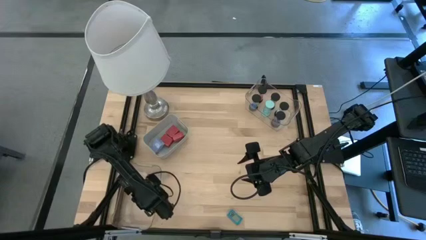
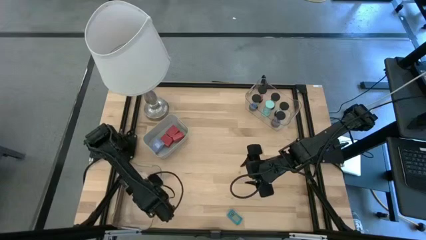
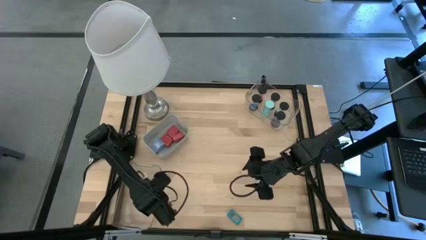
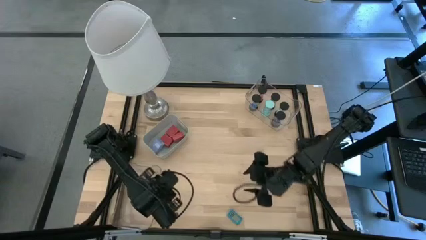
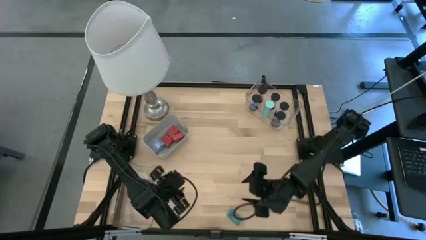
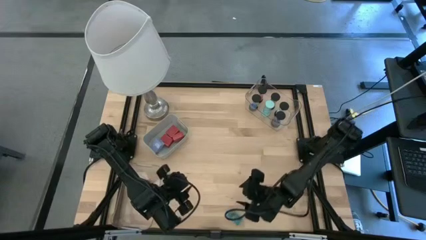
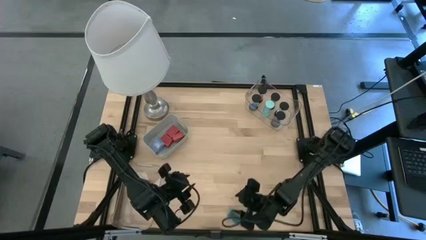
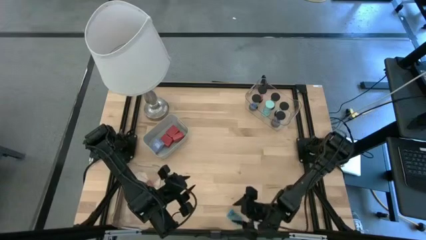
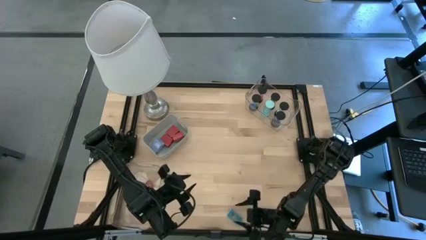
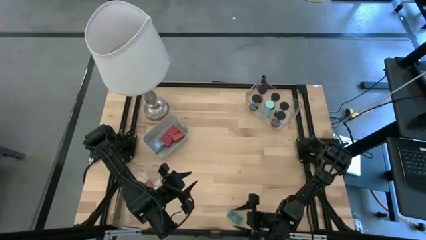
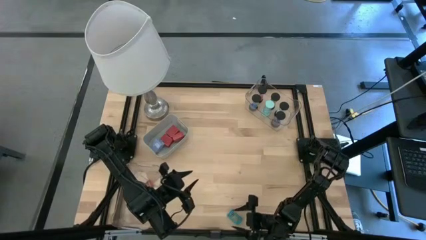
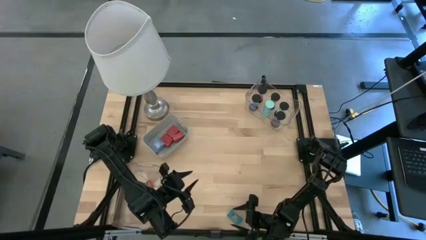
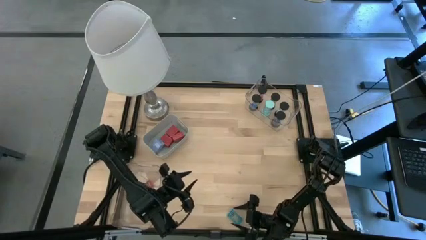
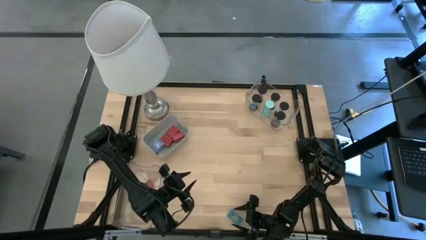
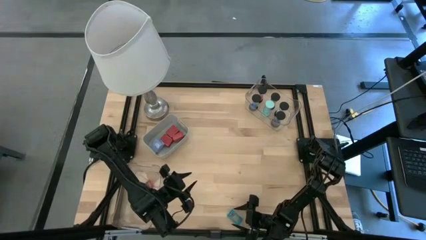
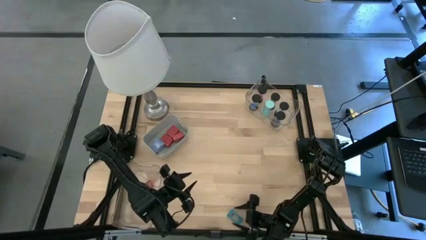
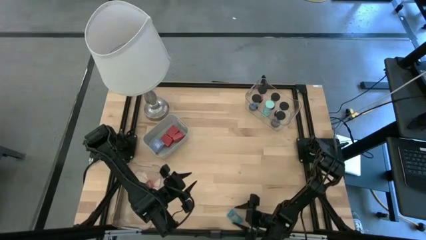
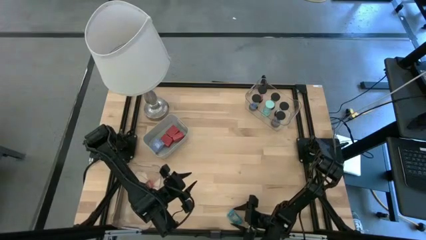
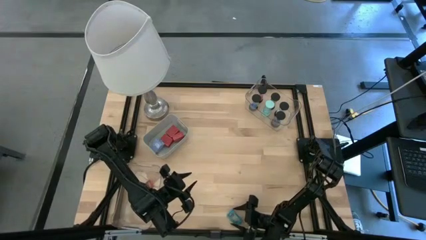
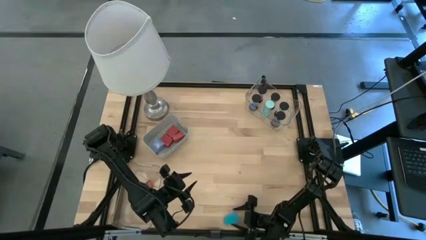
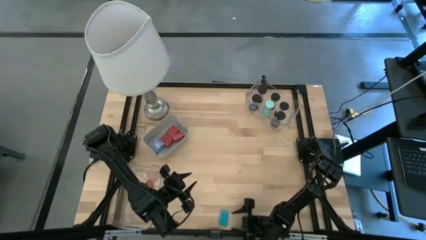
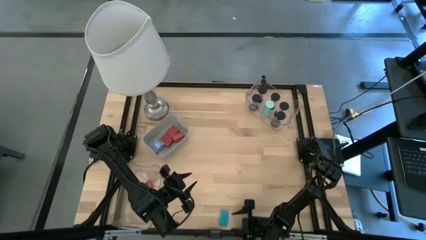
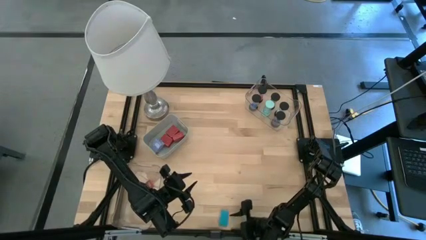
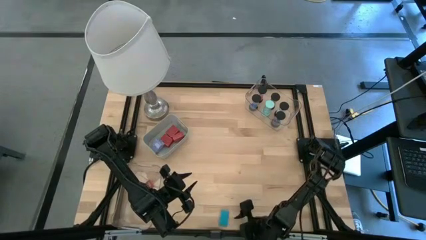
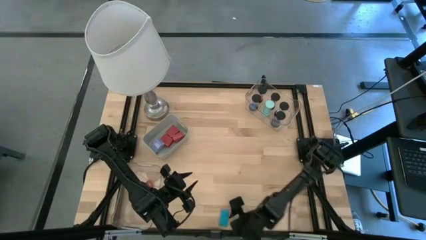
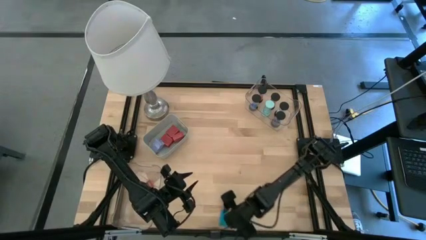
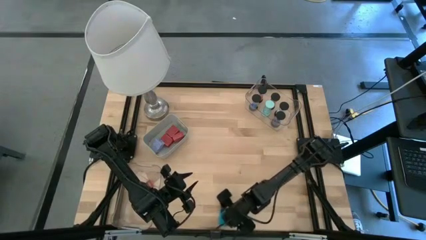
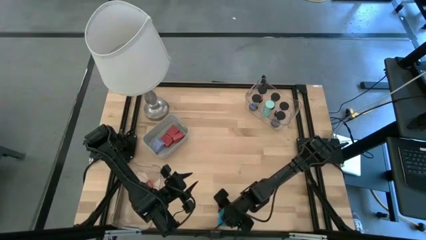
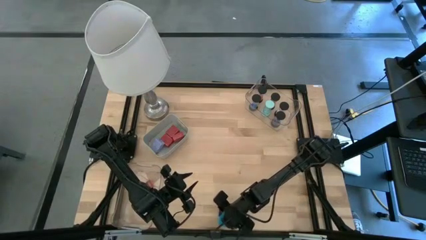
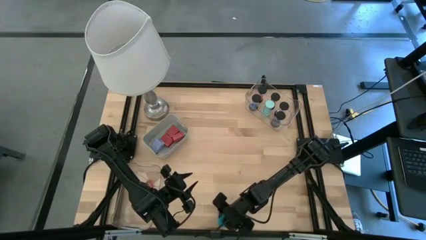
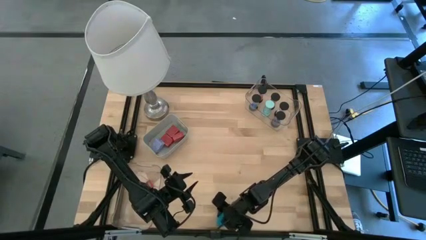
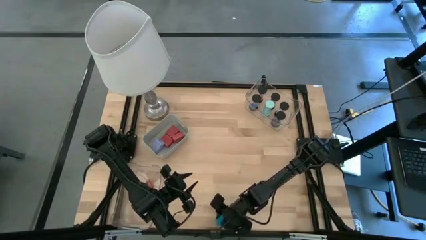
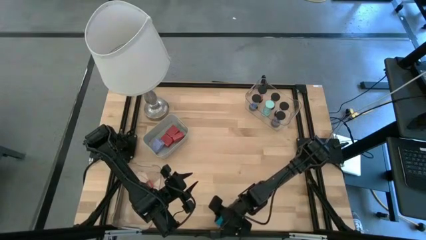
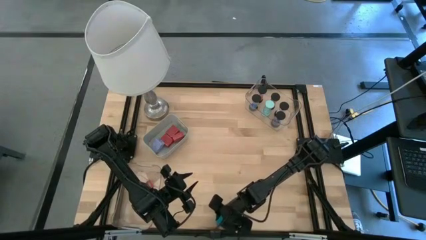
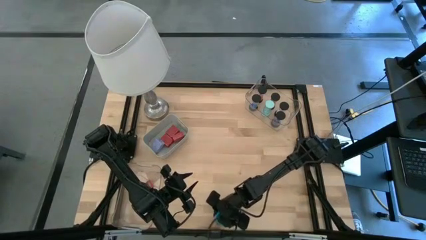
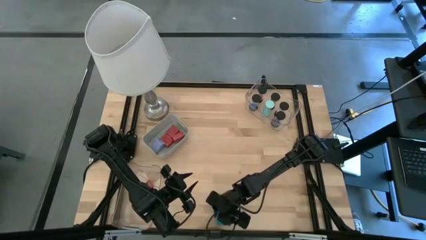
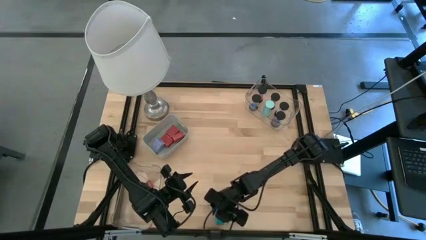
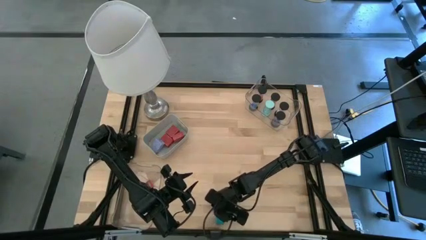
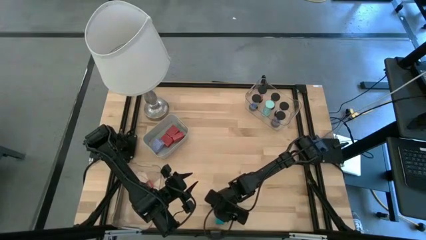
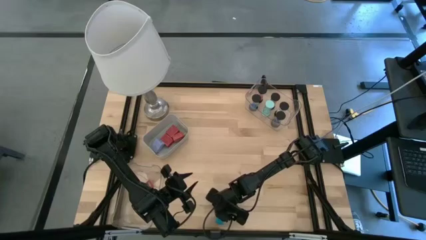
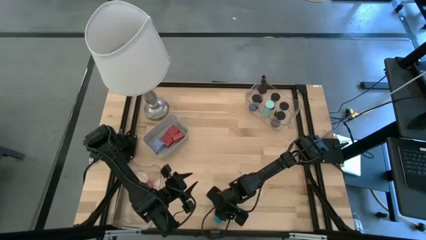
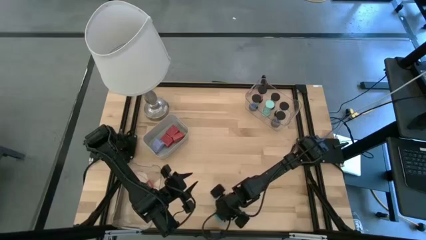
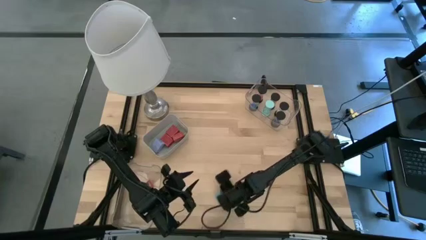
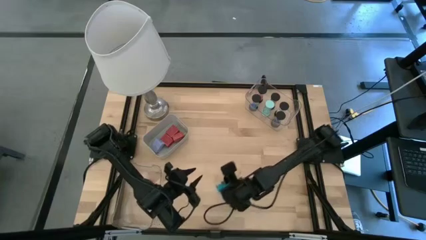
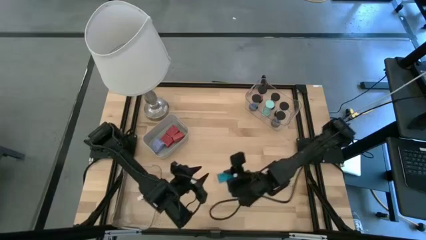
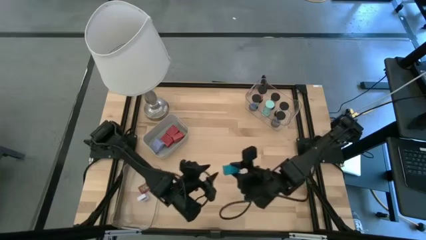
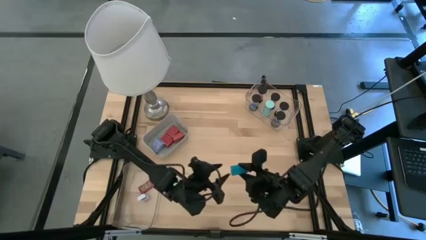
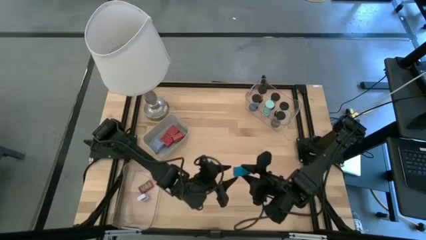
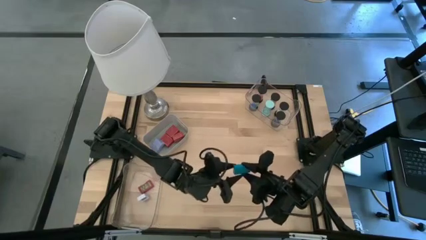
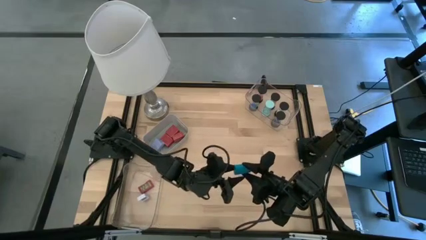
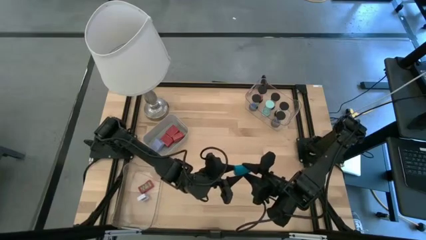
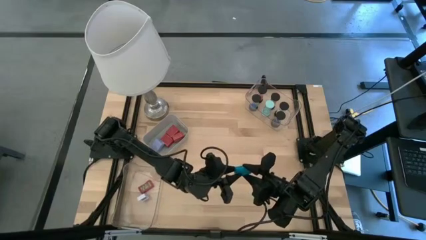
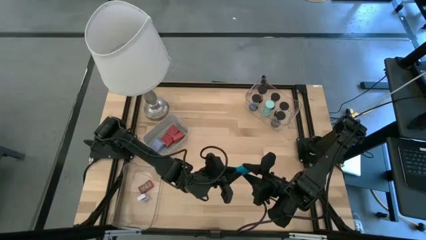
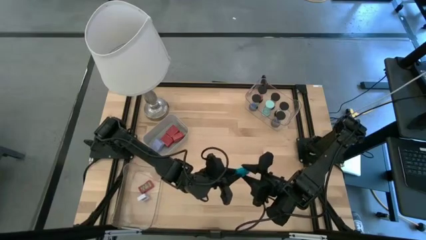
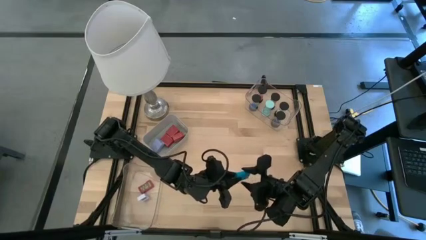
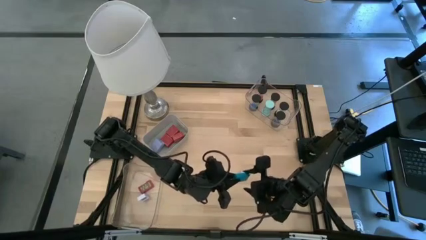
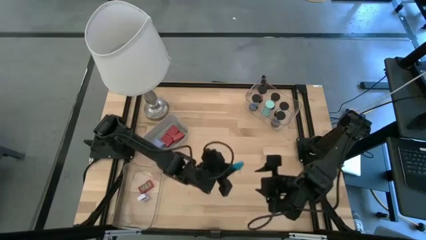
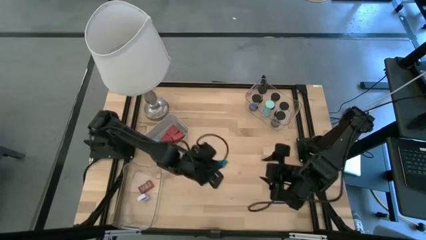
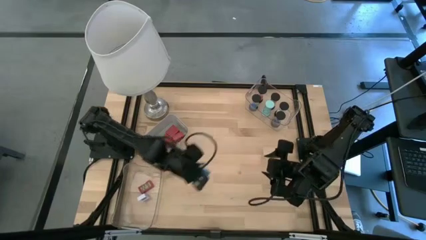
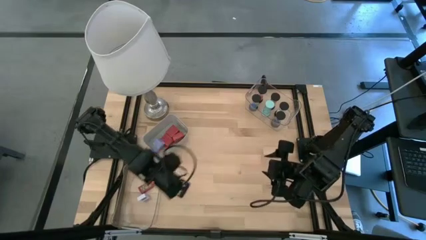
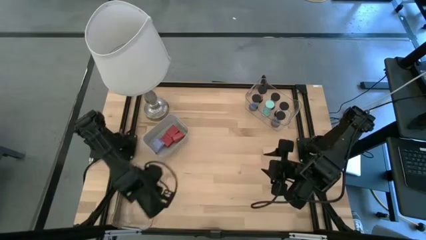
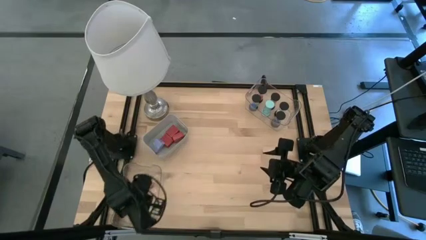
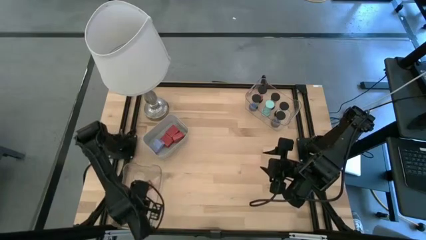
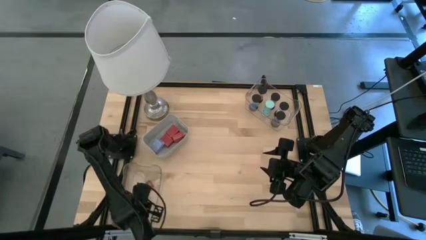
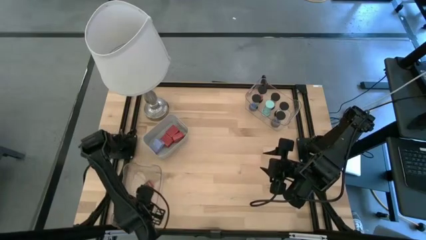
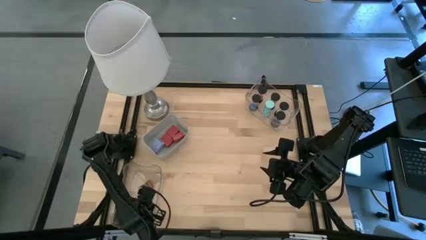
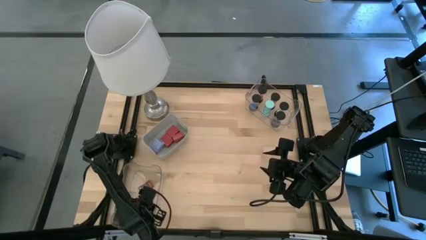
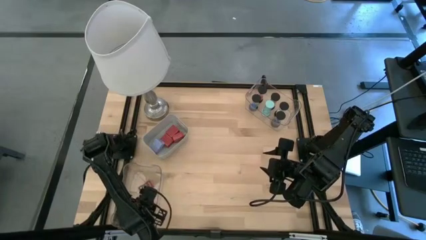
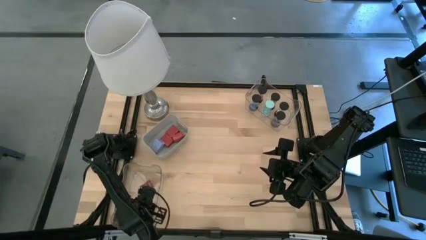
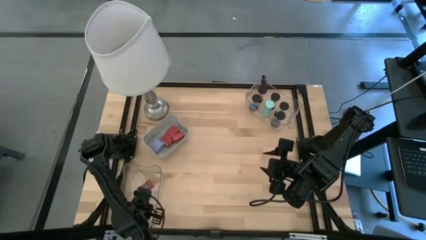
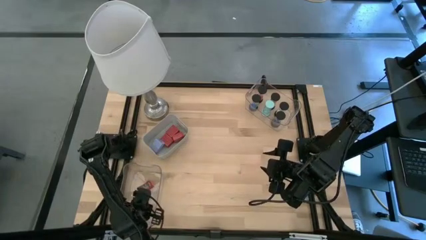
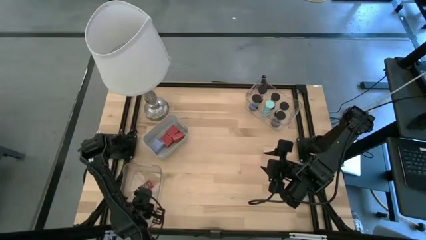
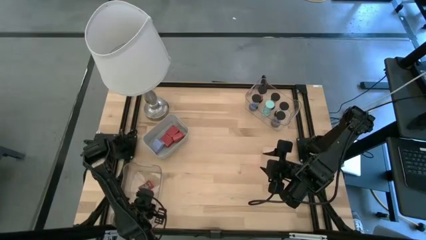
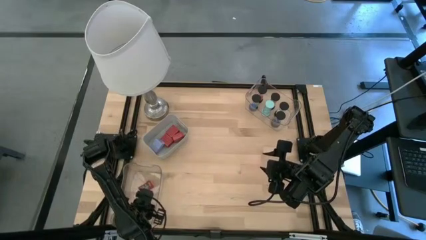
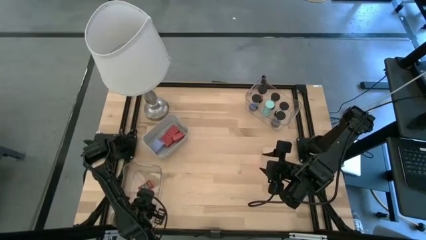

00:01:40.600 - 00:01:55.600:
Task: Pick & Place Office items
Put the blue digital timer into the bottom transparent bin

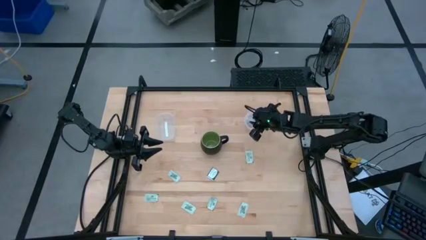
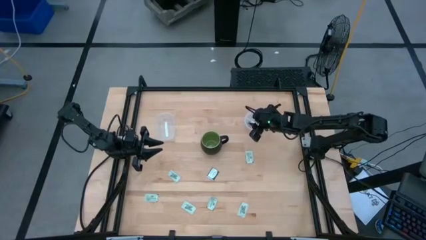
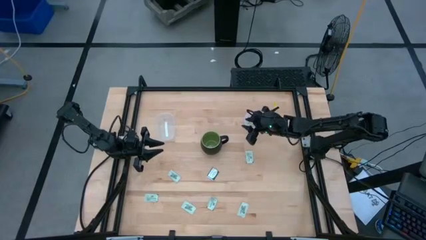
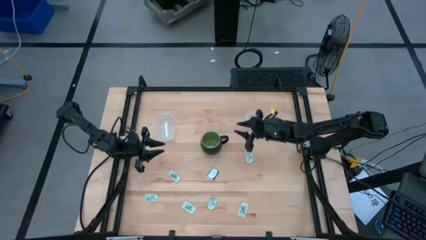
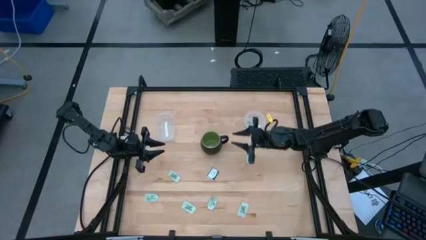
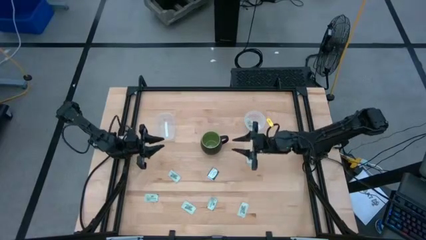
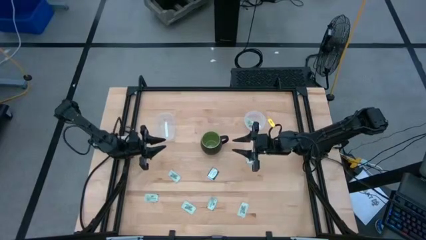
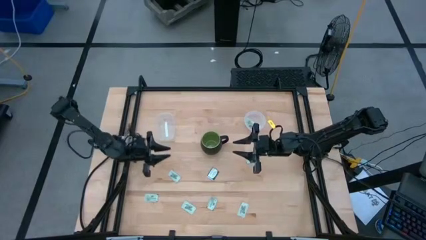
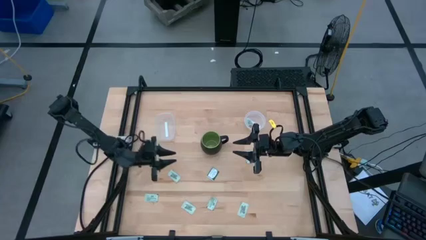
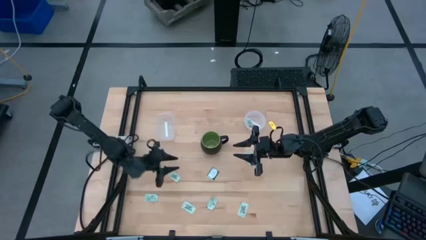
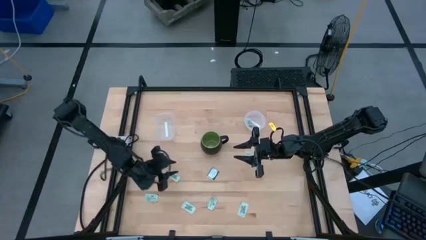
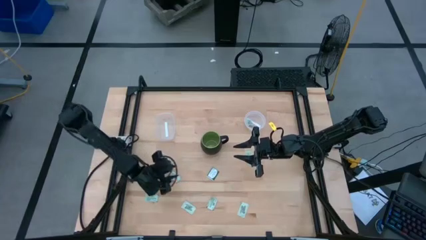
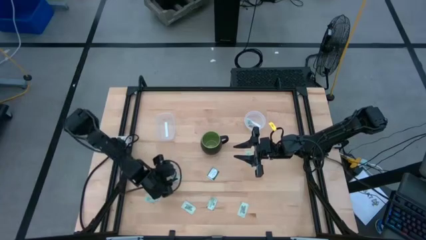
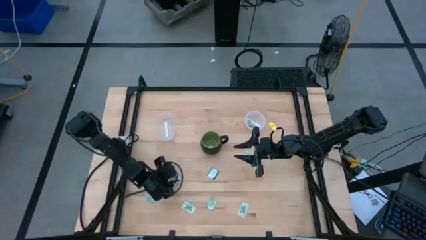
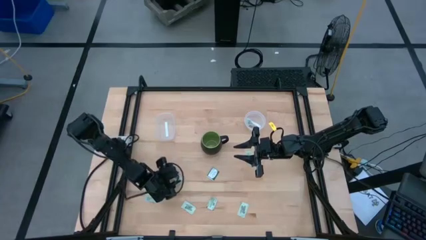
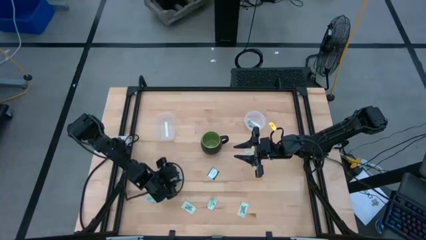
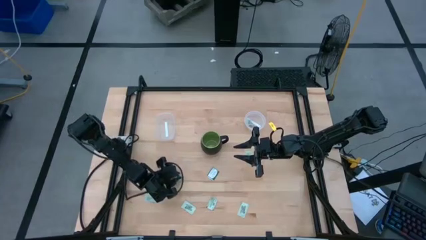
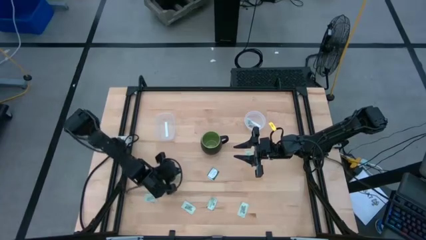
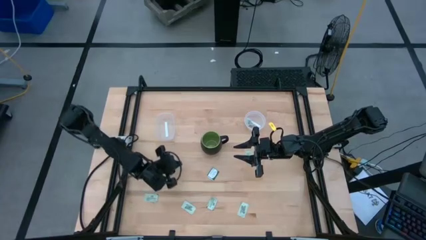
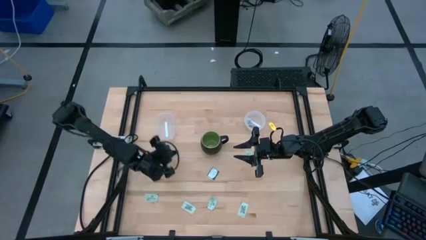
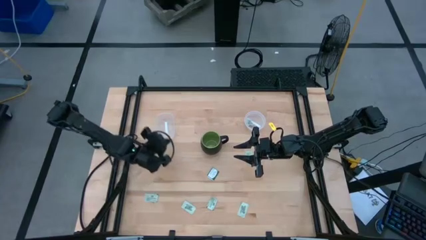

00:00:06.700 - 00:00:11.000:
Task: Pick and place items into bin
Put the green stevia packet into the left transparent bin
